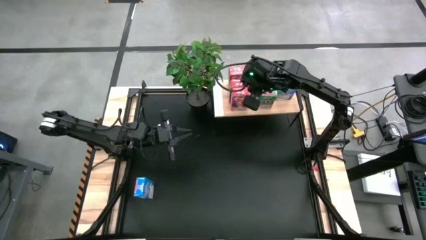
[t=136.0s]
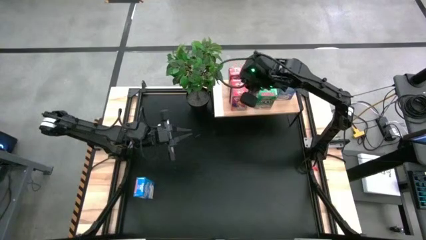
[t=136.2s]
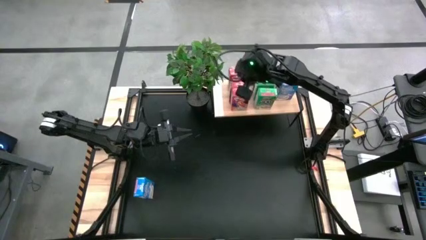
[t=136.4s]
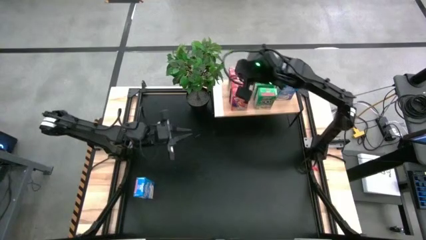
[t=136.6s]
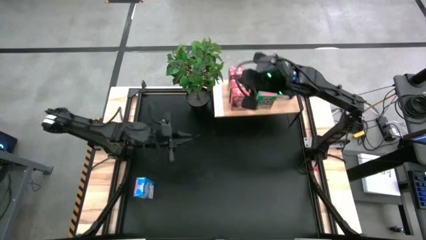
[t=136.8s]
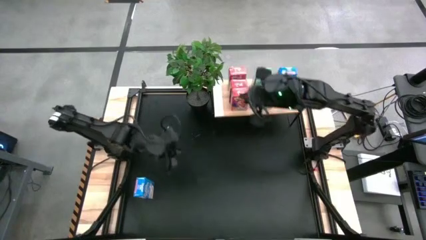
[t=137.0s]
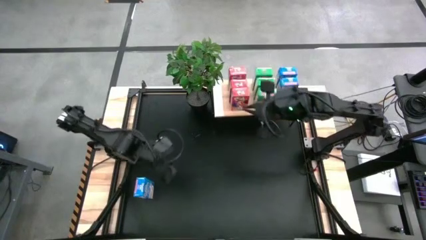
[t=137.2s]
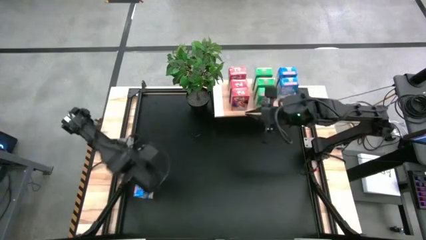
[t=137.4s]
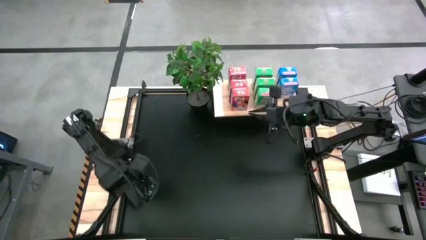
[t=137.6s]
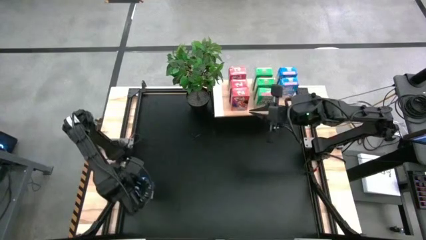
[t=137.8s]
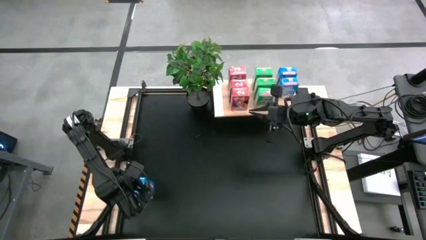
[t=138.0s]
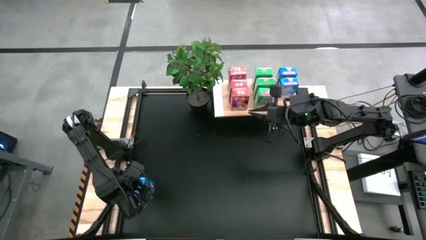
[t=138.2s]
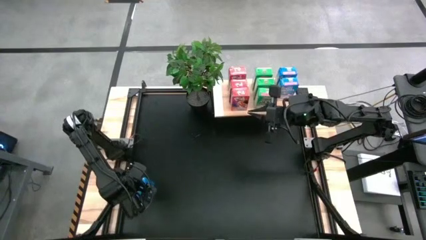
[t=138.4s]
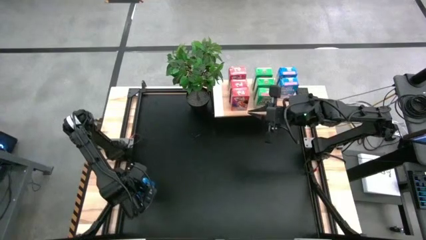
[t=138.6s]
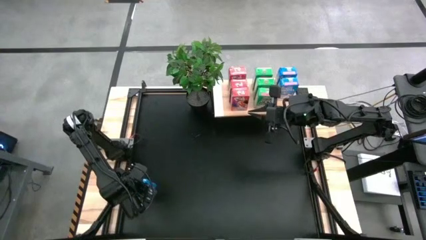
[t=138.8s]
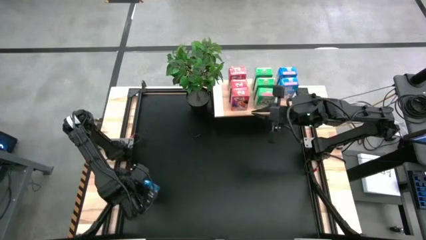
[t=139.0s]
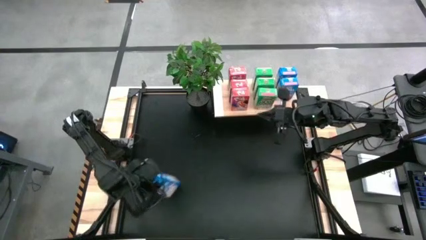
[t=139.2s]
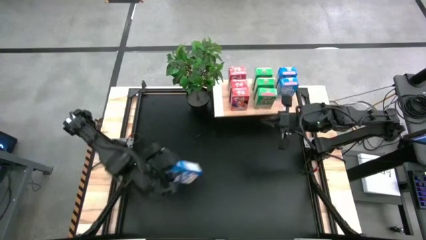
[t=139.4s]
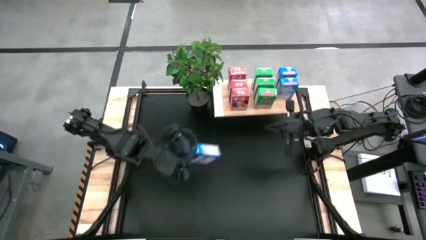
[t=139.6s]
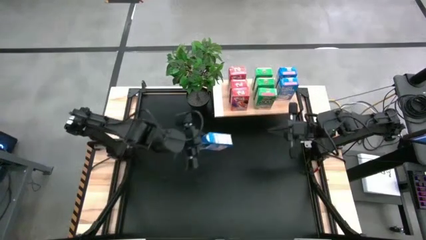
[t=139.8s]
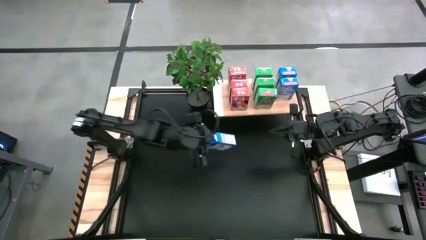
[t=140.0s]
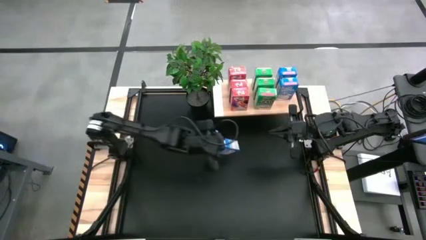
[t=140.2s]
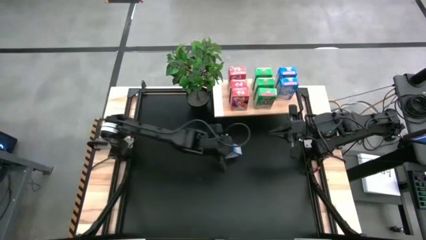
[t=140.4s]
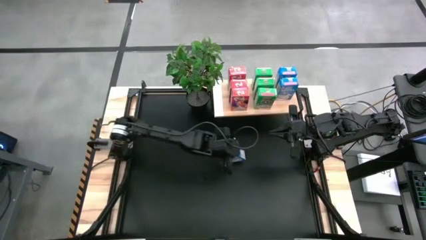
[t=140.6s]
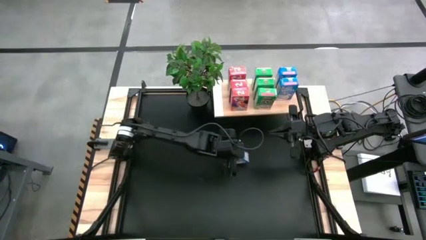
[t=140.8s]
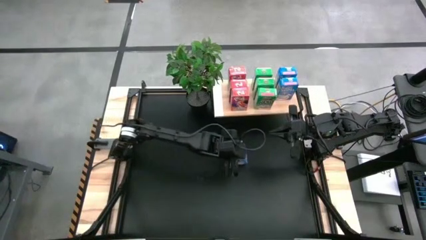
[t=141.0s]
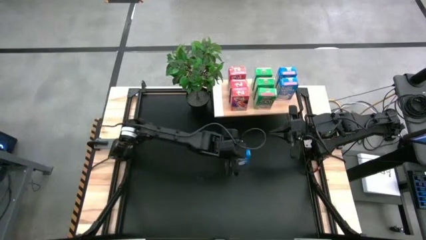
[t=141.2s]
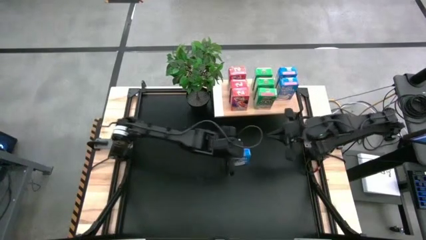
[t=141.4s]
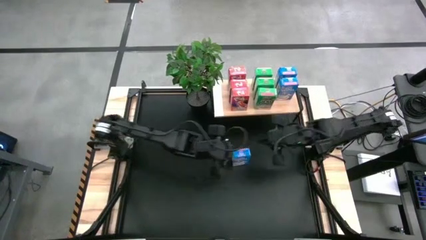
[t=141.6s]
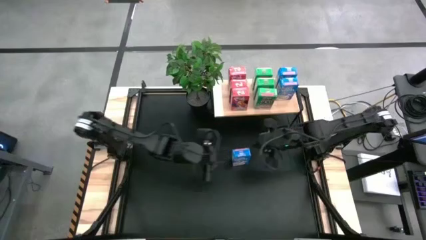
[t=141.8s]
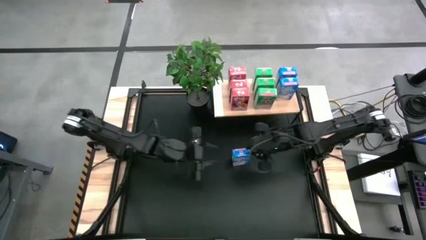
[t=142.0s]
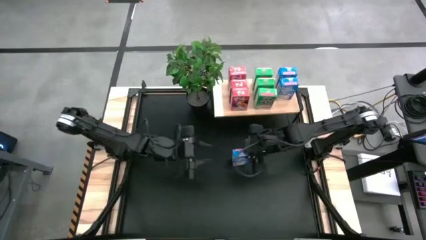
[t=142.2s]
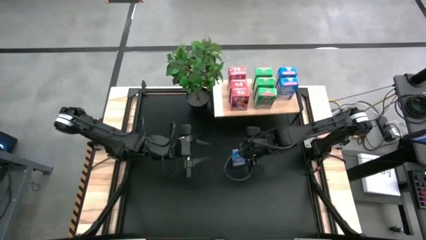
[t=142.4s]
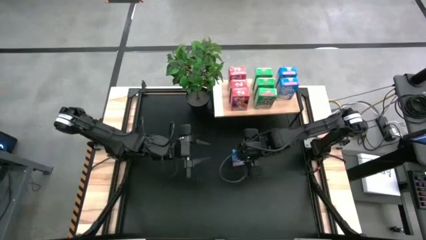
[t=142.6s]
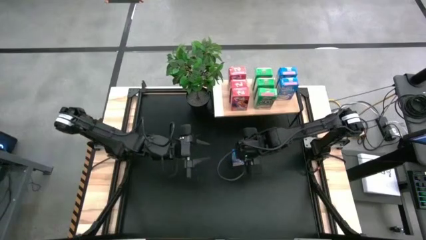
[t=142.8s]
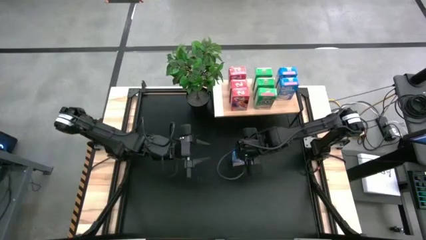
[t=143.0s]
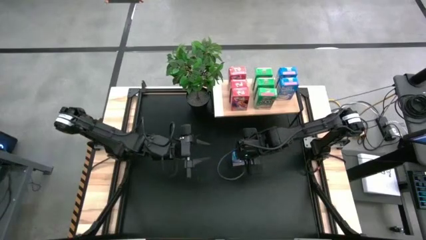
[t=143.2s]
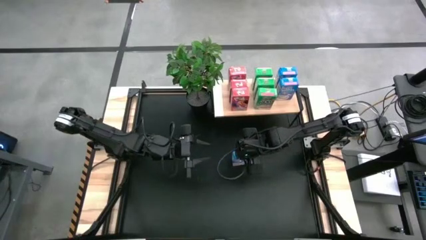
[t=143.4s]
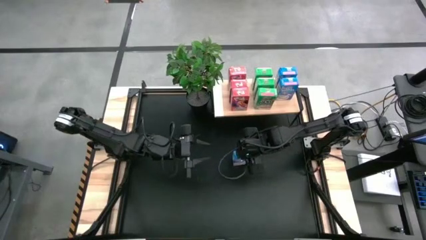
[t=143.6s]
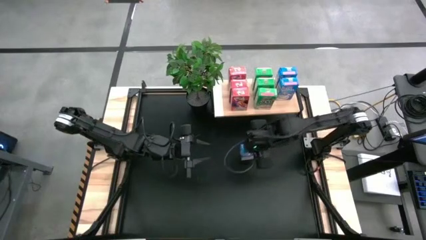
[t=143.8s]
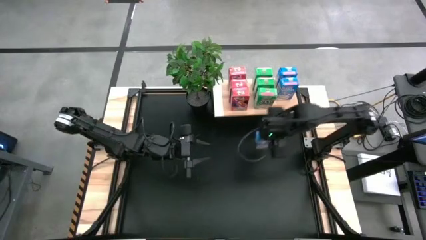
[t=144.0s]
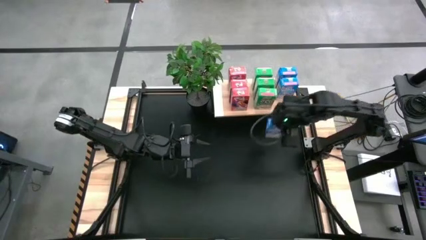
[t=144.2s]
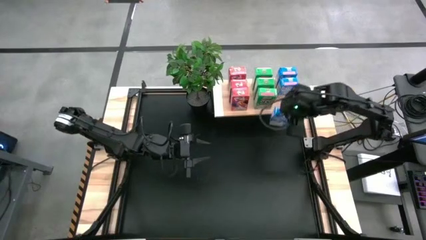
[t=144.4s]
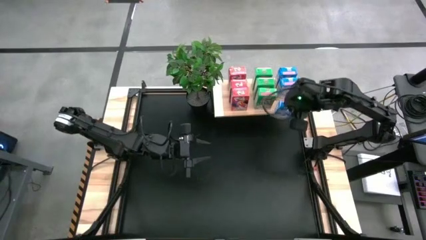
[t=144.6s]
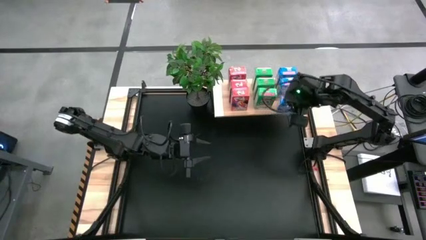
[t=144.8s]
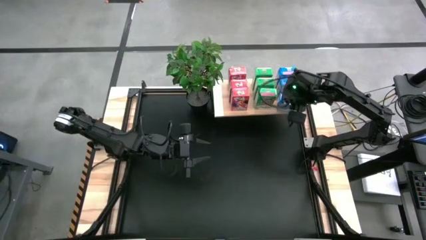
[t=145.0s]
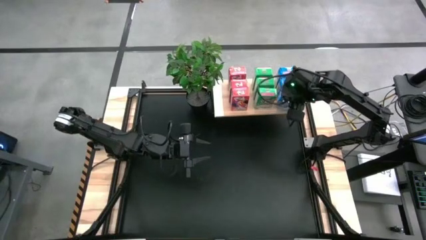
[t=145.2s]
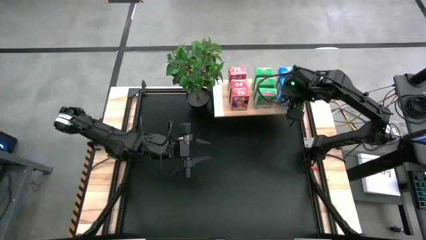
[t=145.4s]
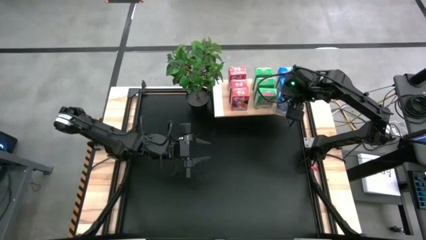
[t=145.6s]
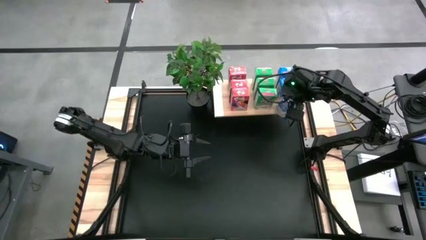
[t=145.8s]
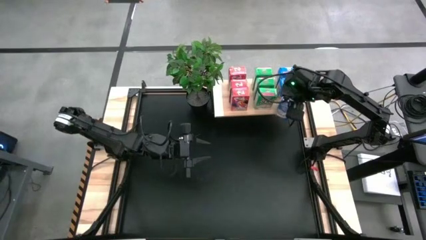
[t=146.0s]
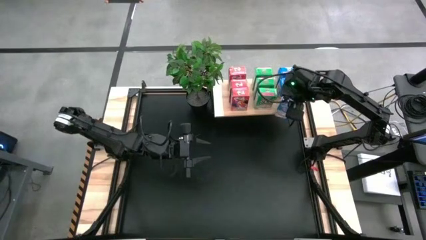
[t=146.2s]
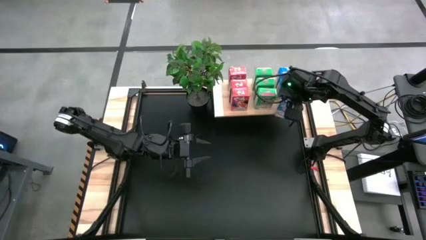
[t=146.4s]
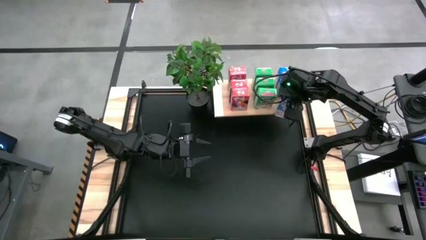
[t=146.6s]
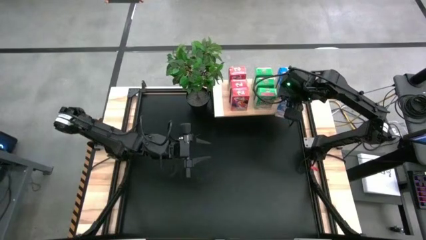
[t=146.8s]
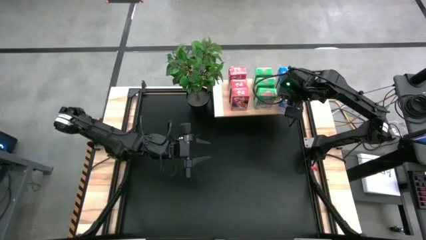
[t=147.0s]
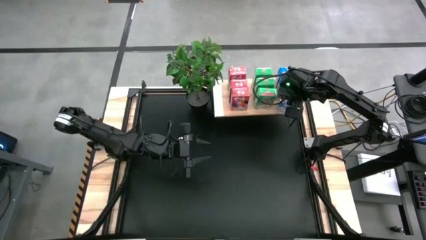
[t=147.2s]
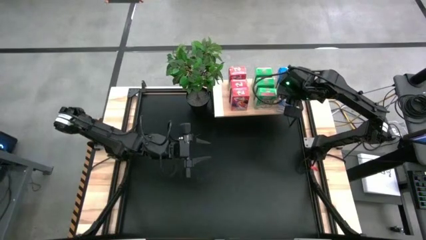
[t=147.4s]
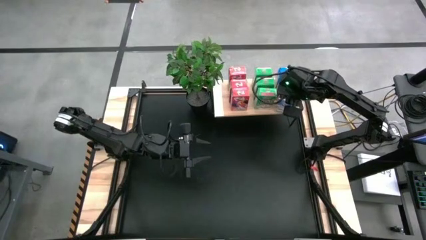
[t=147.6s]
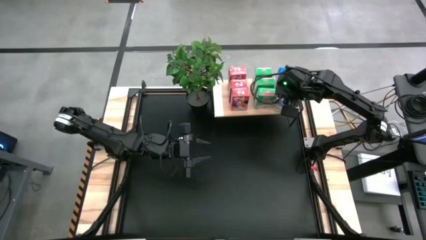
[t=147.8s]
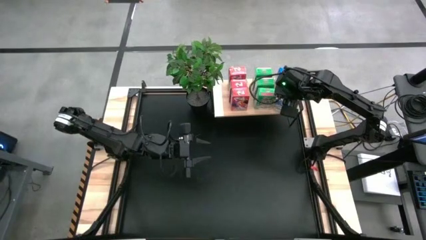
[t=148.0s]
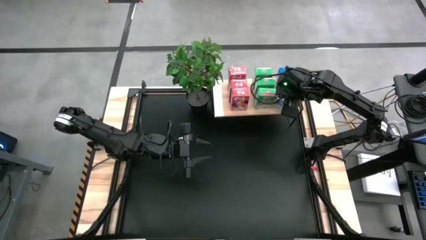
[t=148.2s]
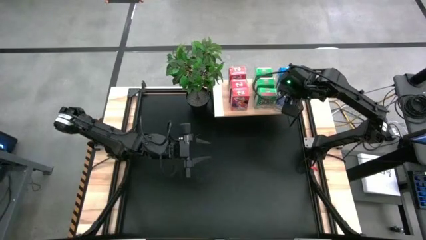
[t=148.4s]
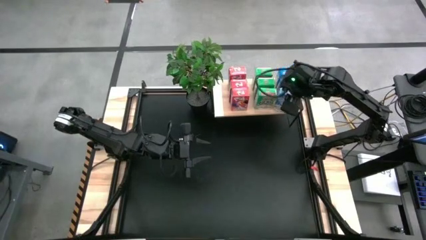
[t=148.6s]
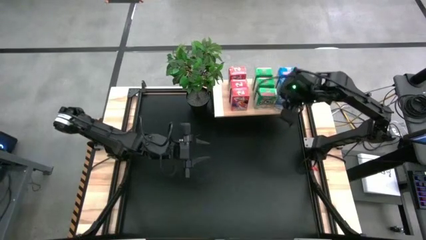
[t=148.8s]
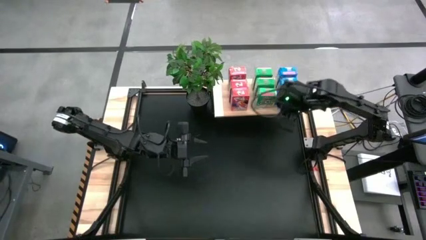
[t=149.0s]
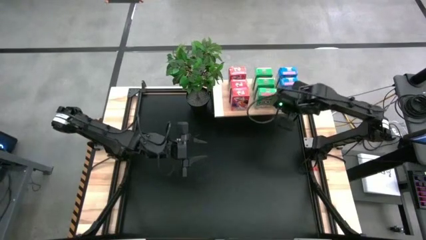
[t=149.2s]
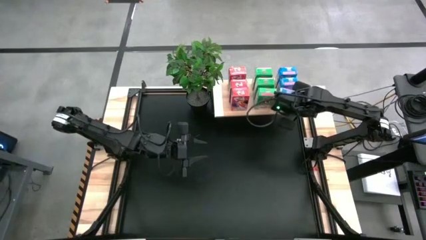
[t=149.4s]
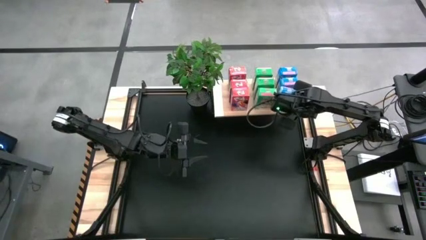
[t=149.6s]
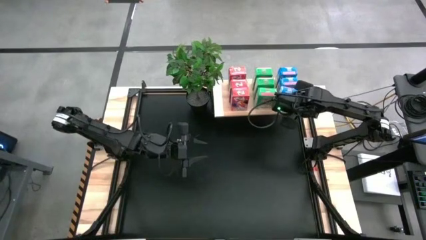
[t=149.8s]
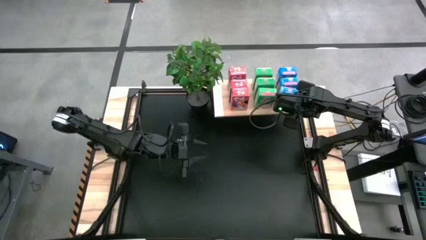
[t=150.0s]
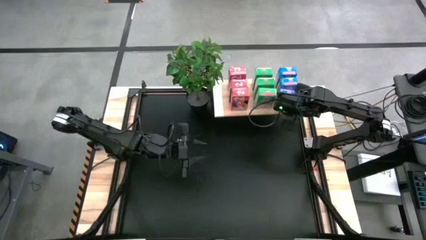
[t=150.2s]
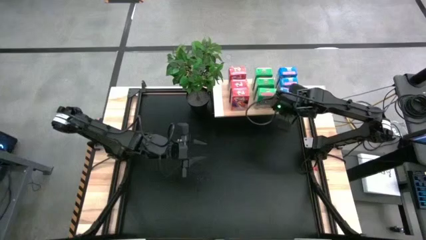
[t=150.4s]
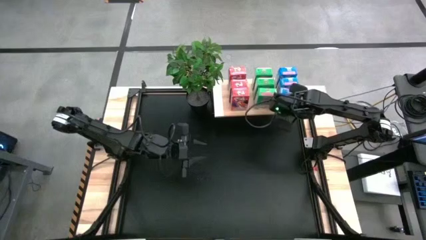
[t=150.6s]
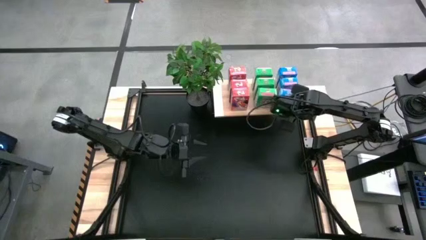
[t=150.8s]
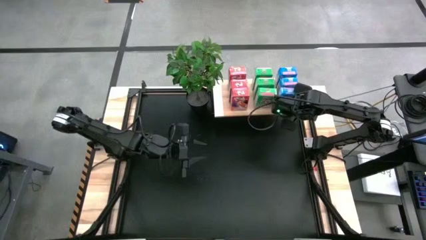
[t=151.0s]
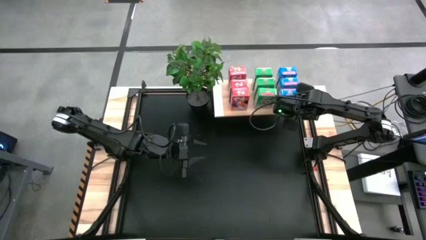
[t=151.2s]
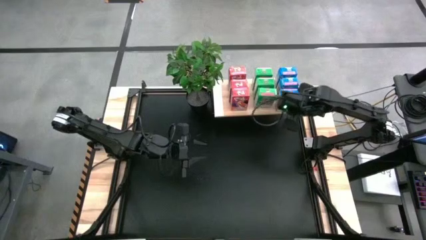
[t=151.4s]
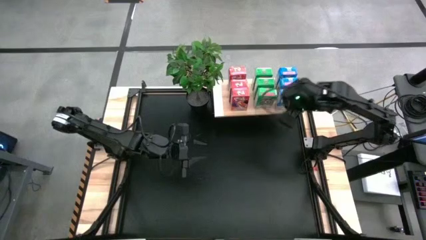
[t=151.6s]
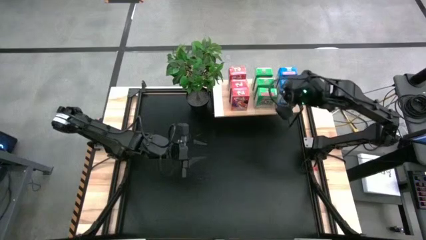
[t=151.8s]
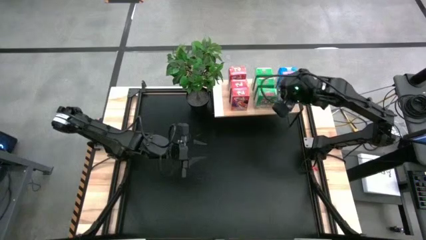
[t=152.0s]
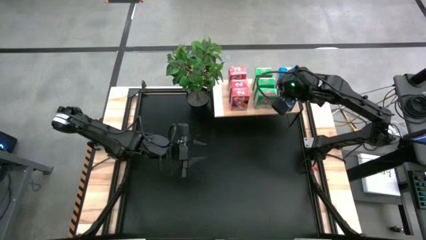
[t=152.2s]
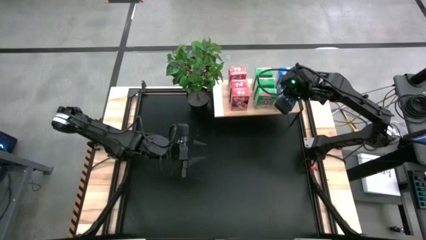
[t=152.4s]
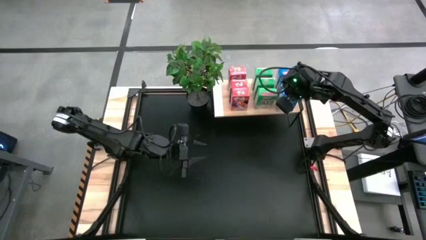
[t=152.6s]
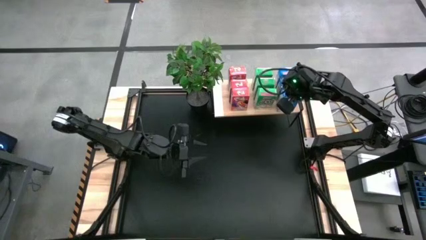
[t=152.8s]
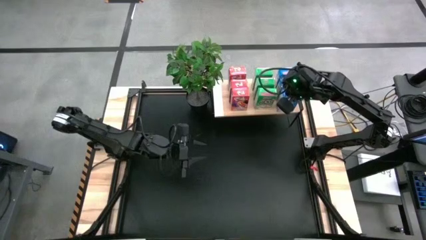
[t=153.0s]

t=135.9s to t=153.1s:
Task: Stack cereal on shelf
Put the blue cereal box on the shelf
